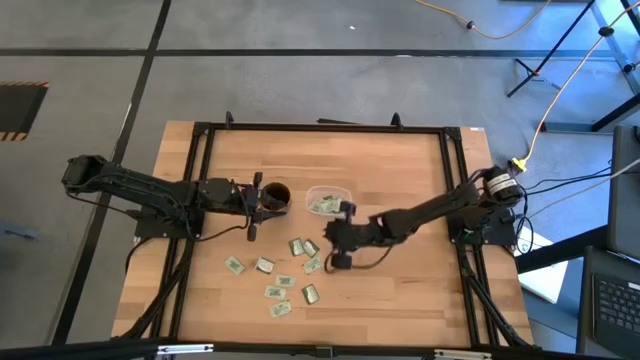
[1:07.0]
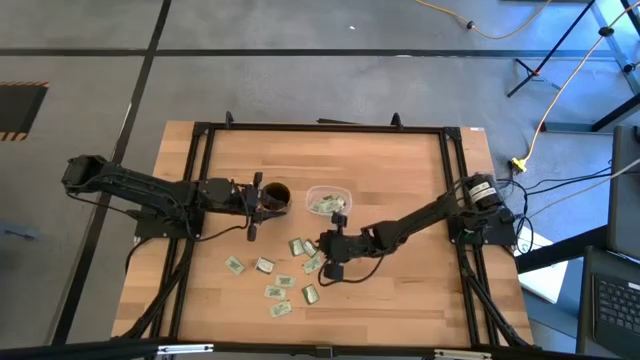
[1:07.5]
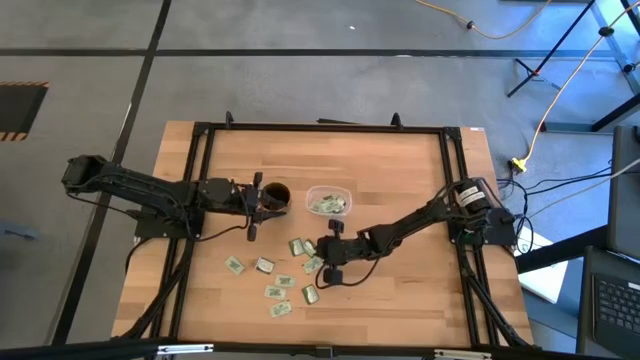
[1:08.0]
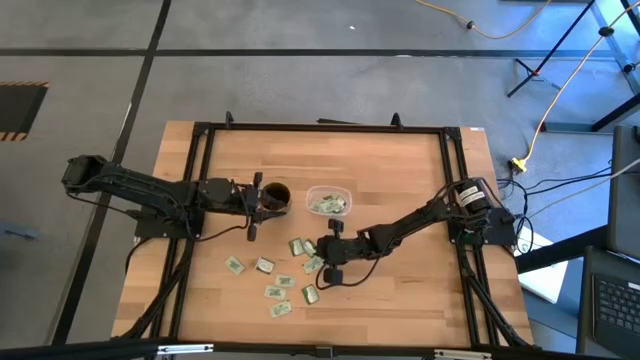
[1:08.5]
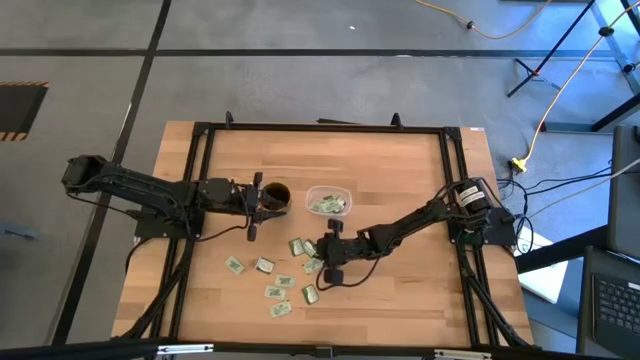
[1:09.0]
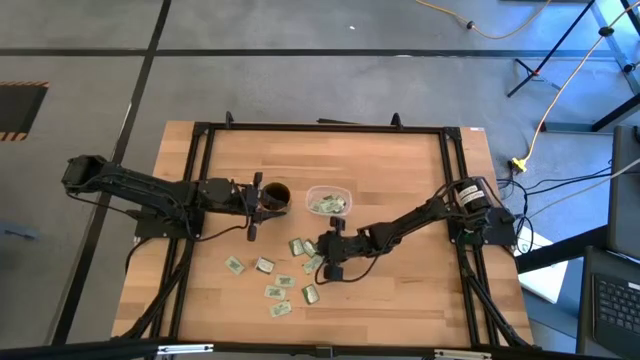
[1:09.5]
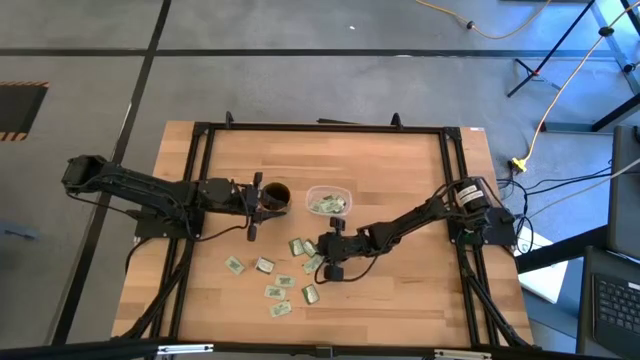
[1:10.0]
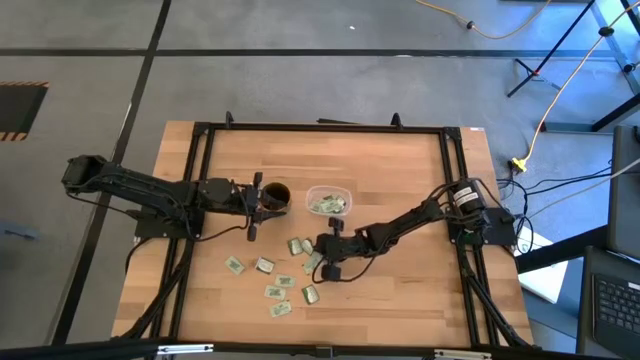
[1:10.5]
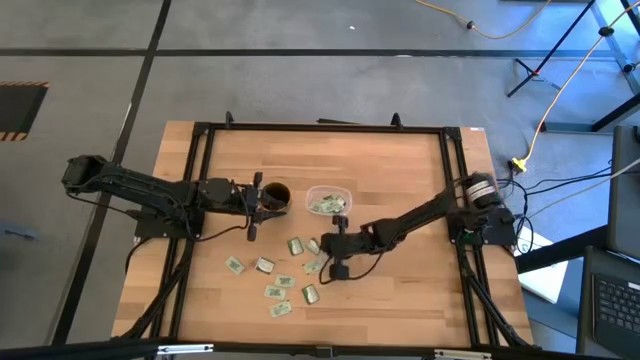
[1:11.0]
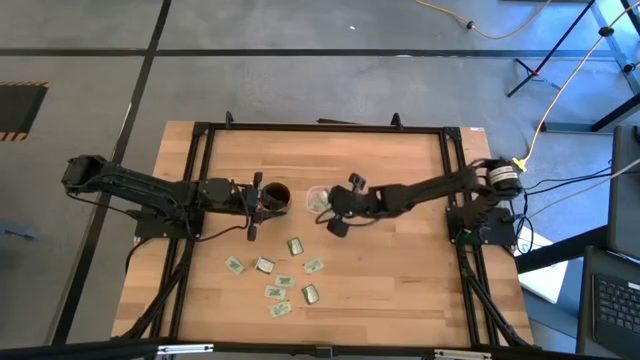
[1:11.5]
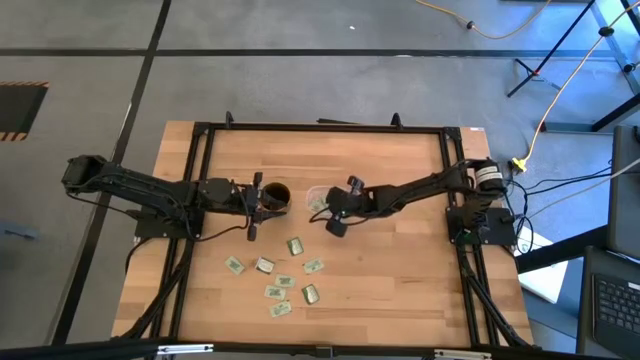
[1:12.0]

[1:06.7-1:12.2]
Task: Pick and place items into bin
Put the green truvia pack into the transparent bin

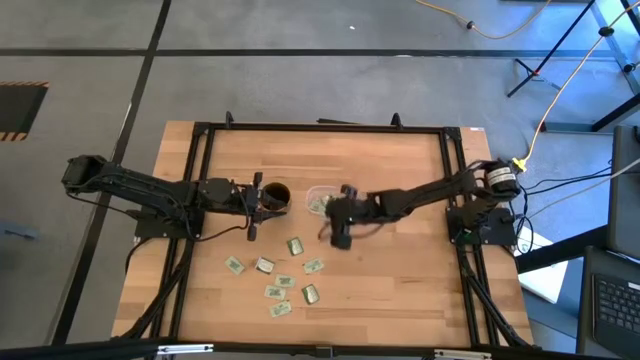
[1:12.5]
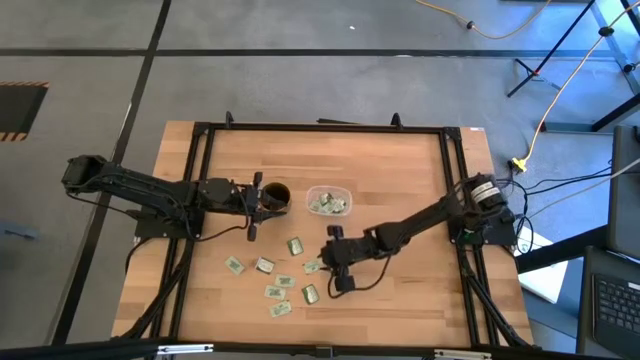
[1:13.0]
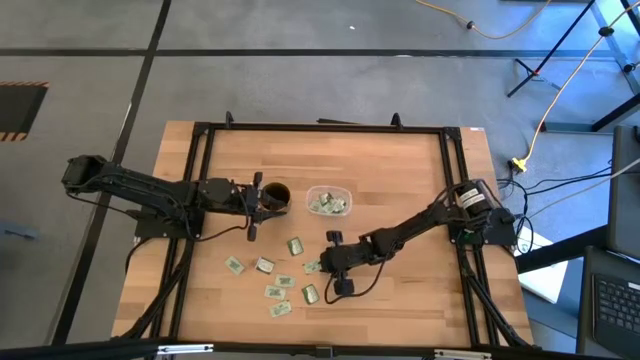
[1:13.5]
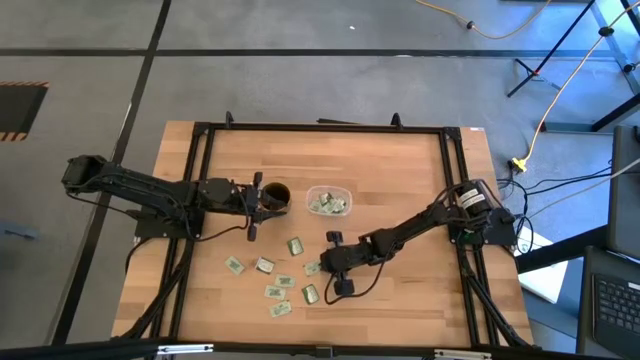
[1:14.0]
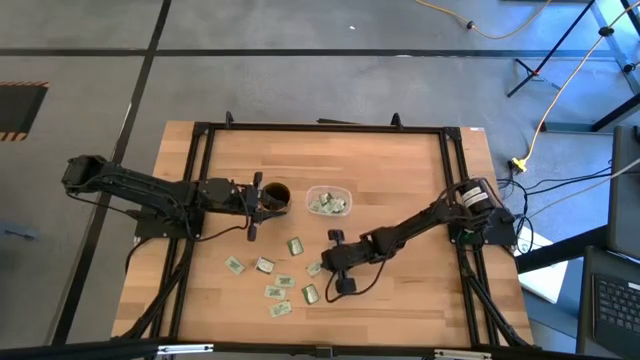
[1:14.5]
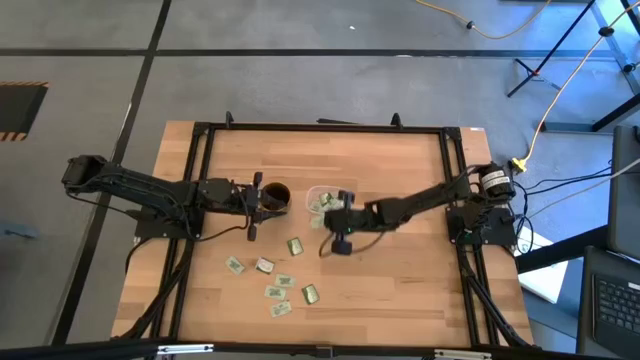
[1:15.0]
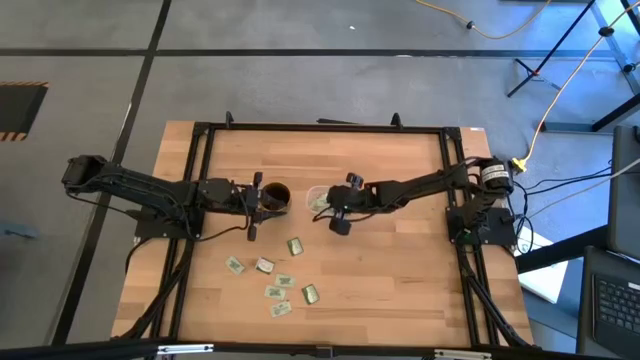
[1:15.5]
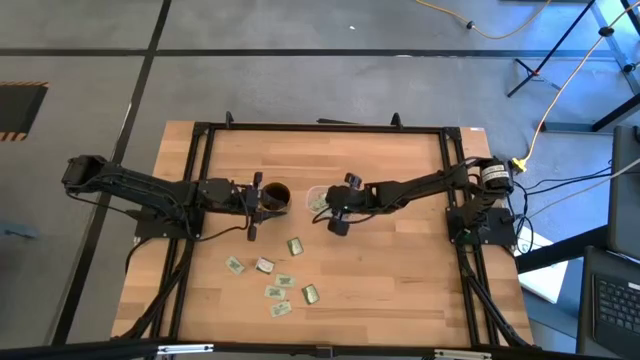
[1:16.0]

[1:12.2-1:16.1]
Put the light green stevia pack into the transparent bin

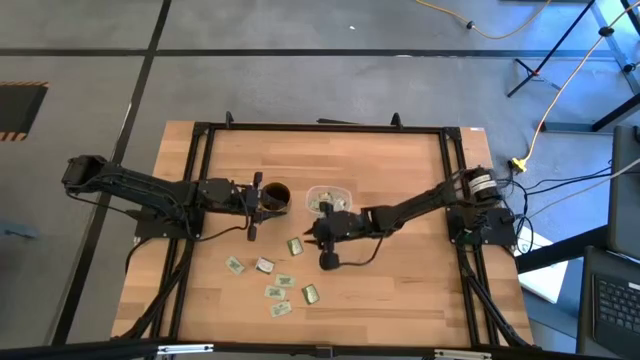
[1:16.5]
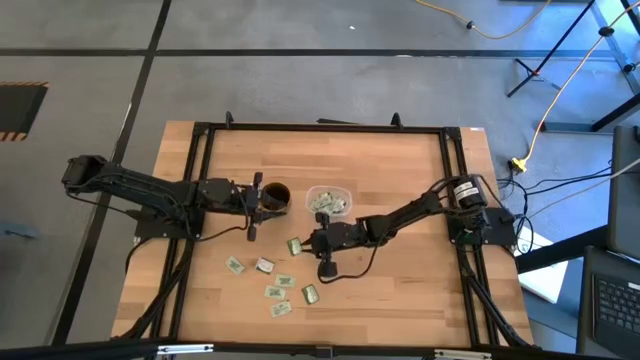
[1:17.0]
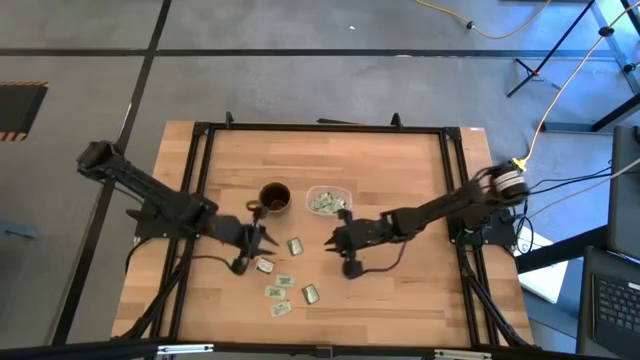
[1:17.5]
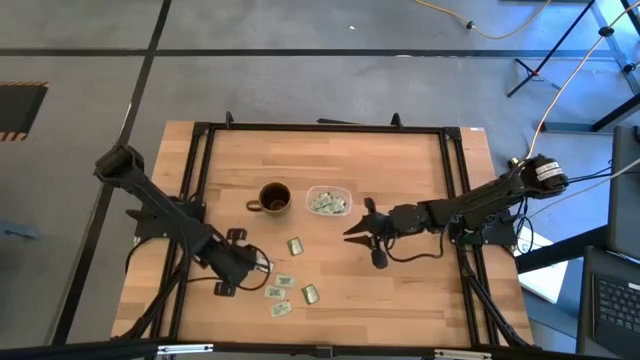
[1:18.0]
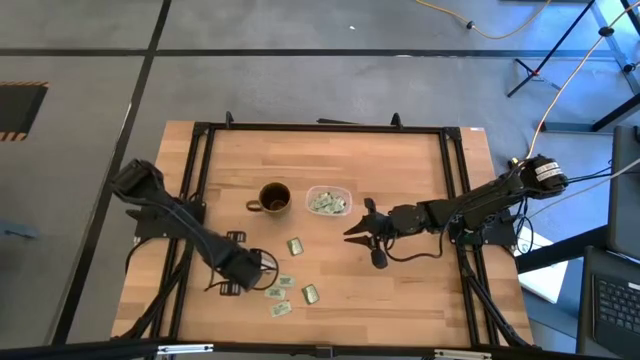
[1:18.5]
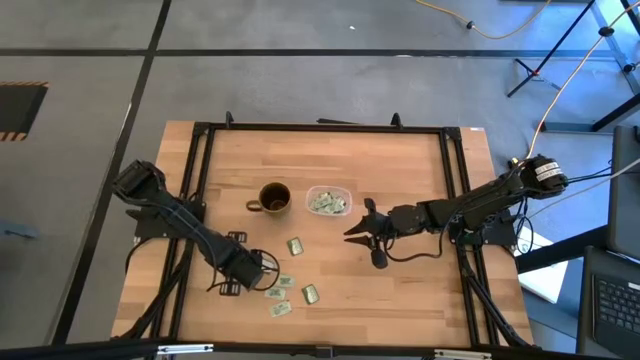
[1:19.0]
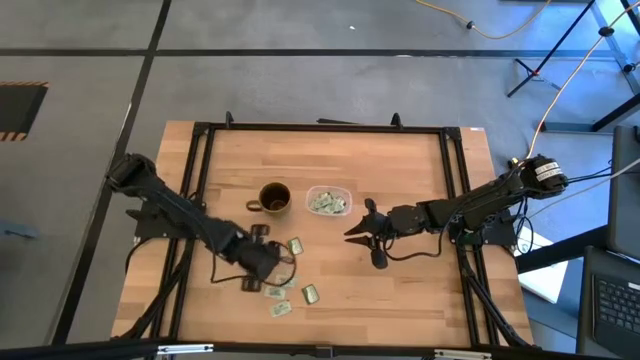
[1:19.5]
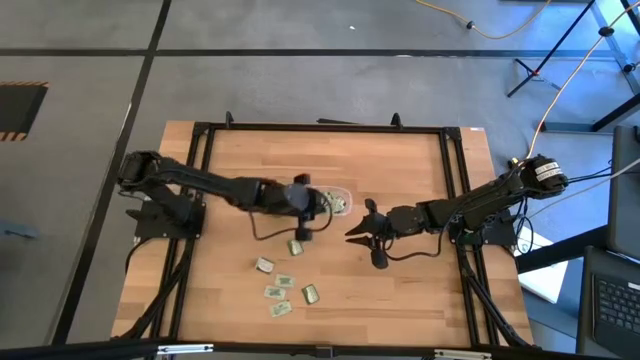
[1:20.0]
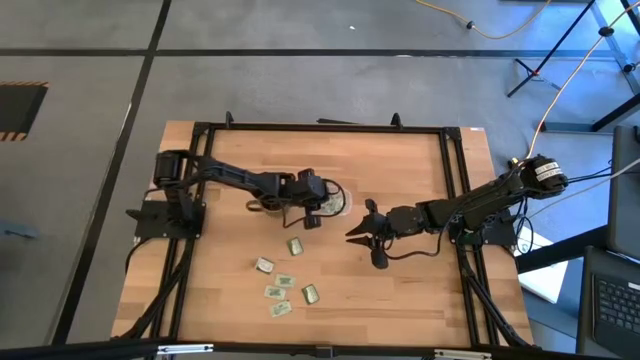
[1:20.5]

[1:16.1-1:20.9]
Put the light green stevia pack into the transparent bin

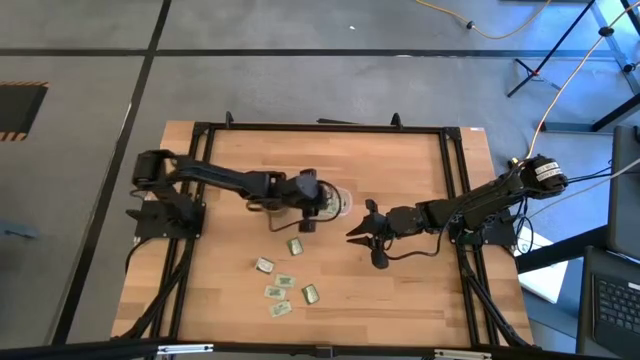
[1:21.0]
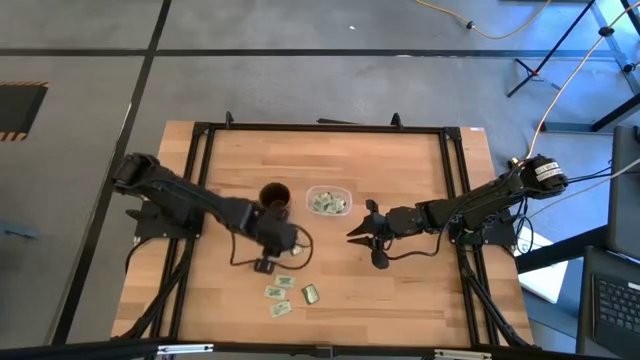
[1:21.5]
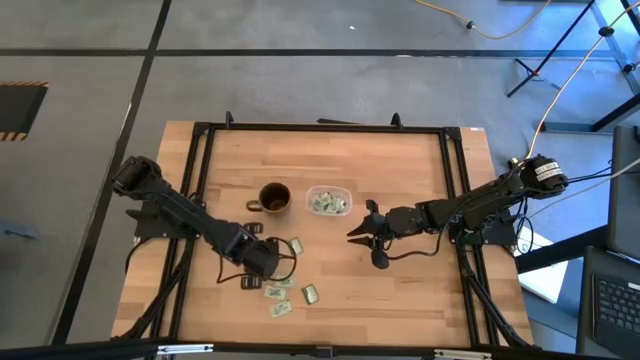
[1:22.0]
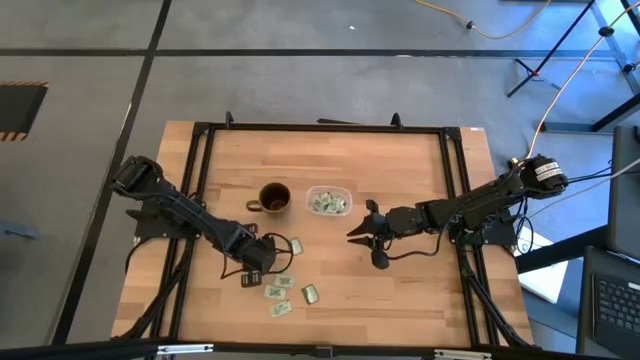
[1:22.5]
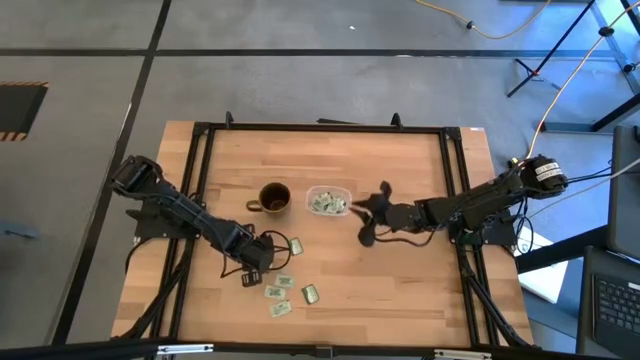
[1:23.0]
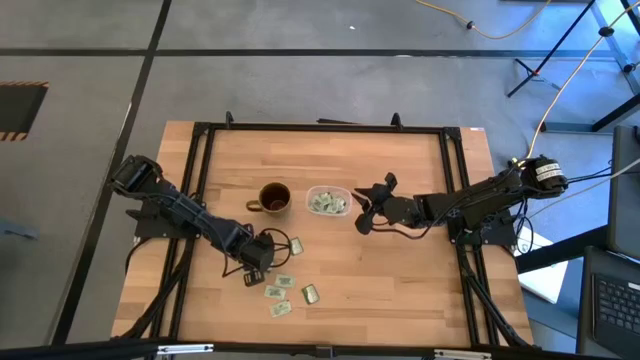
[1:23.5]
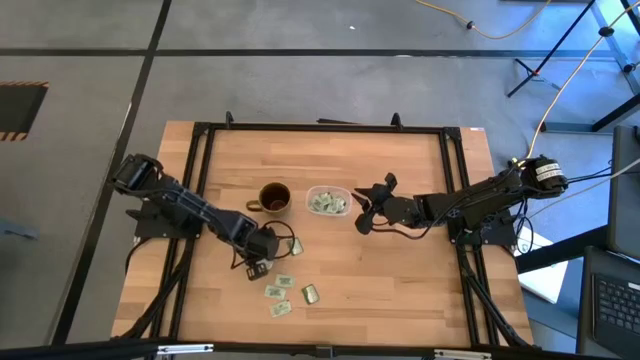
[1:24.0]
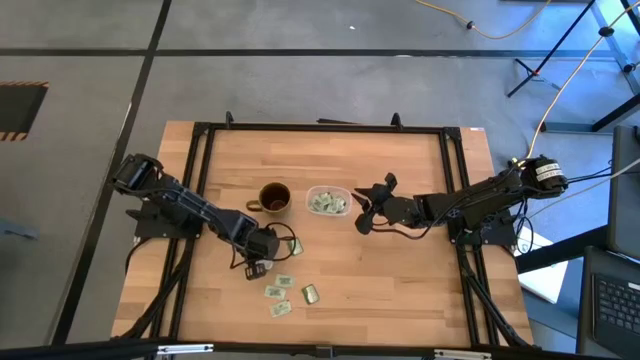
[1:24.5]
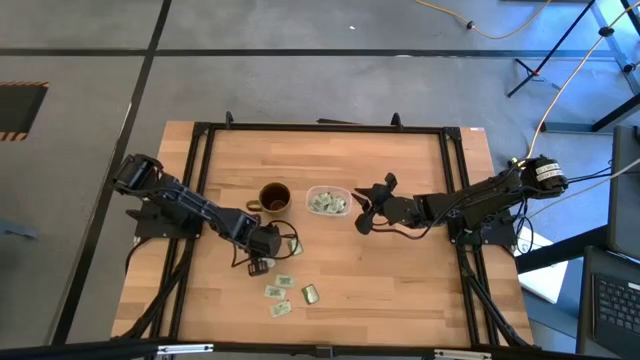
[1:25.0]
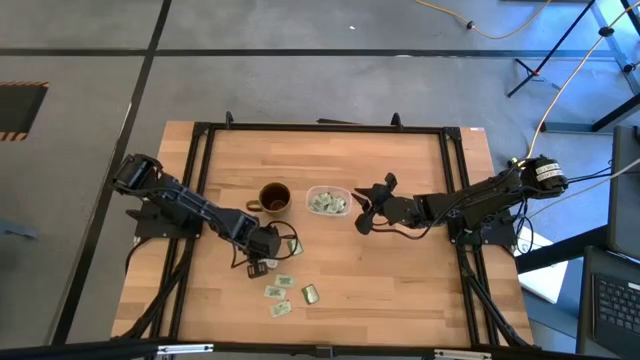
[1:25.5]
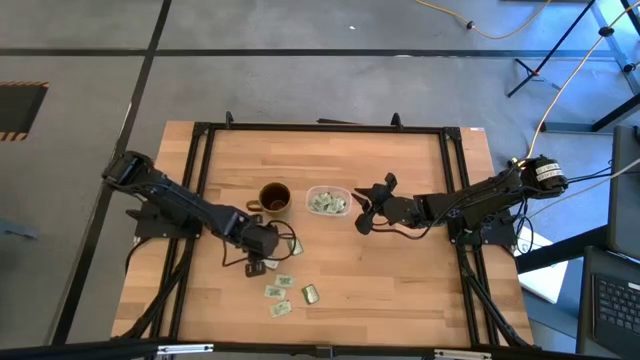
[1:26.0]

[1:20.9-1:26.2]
Put the green truvia pack into the transparent bin

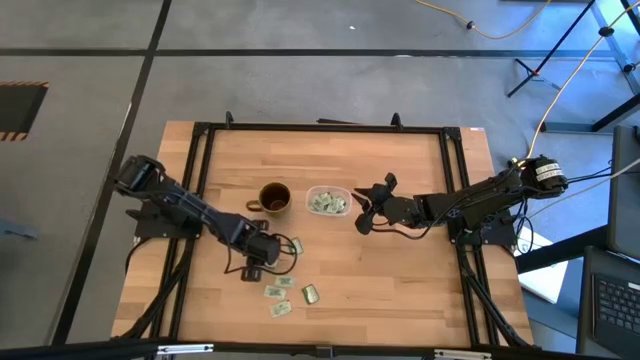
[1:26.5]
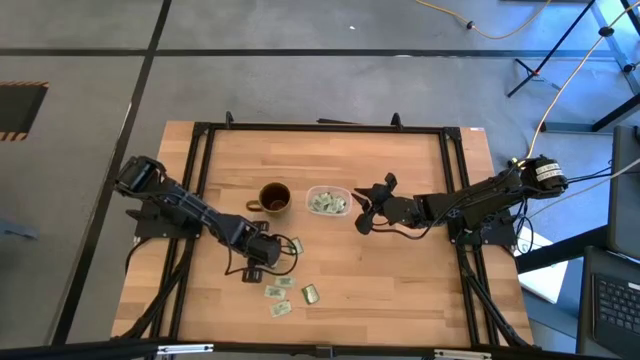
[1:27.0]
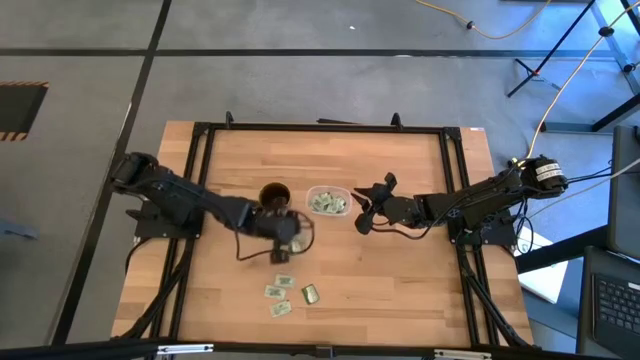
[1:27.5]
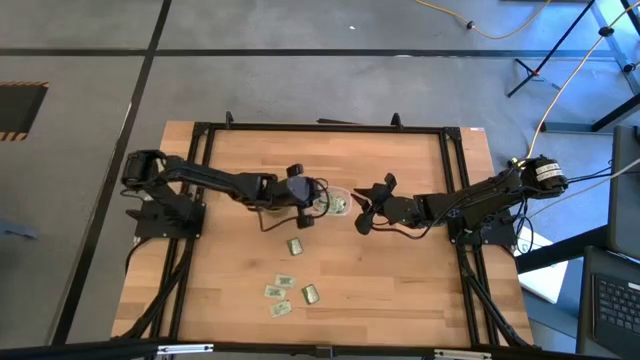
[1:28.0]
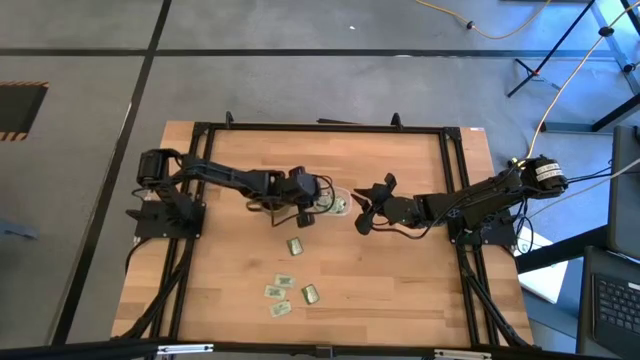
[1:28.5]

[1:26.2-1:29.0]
Put the green truvia pack into the transparent bin
